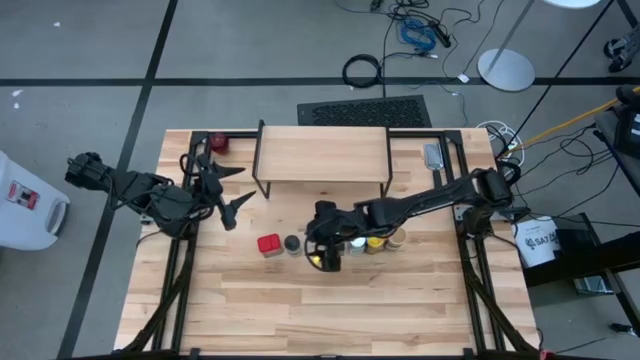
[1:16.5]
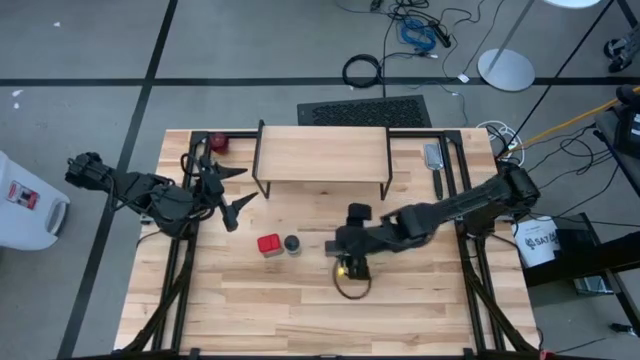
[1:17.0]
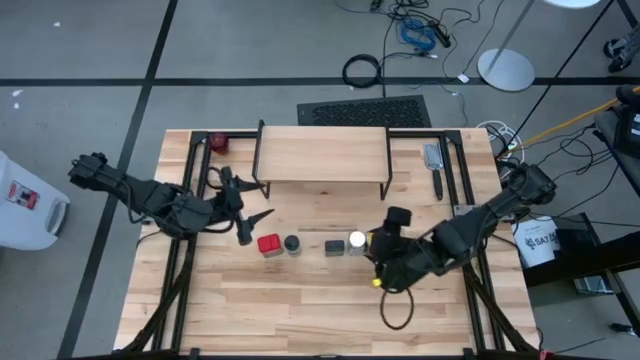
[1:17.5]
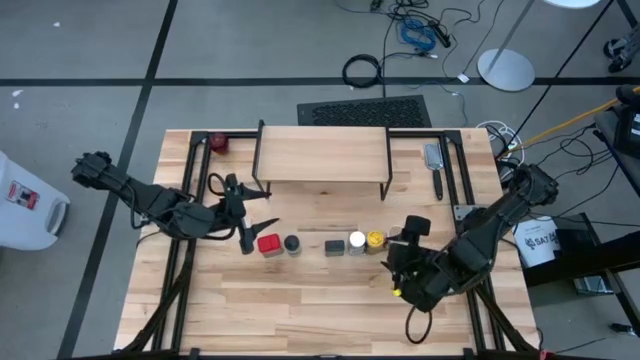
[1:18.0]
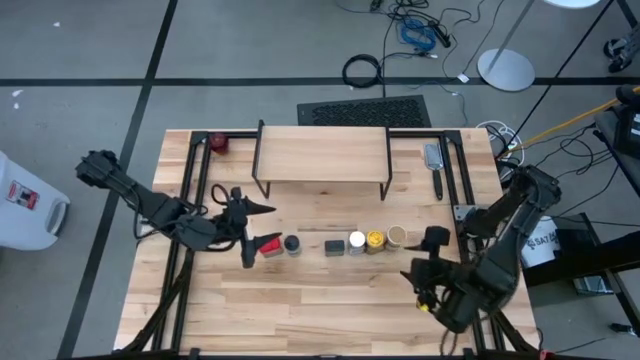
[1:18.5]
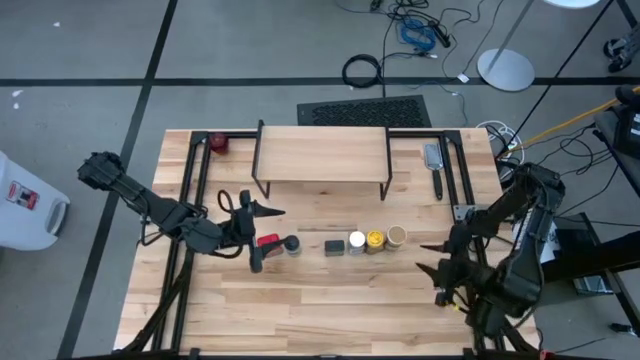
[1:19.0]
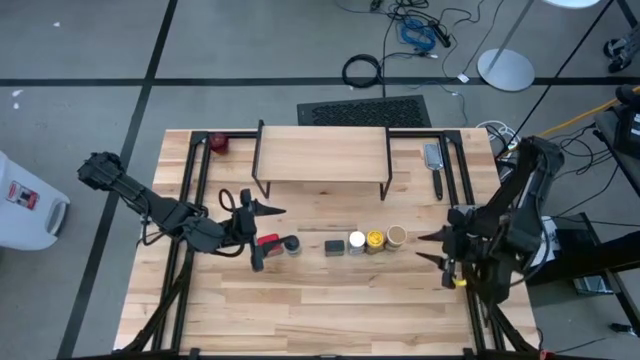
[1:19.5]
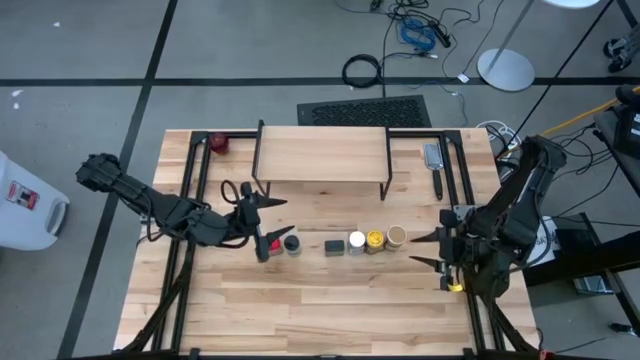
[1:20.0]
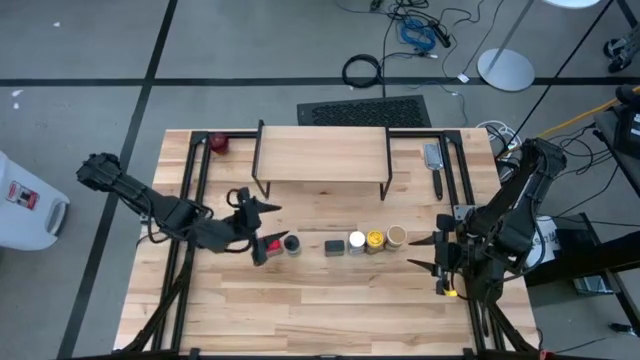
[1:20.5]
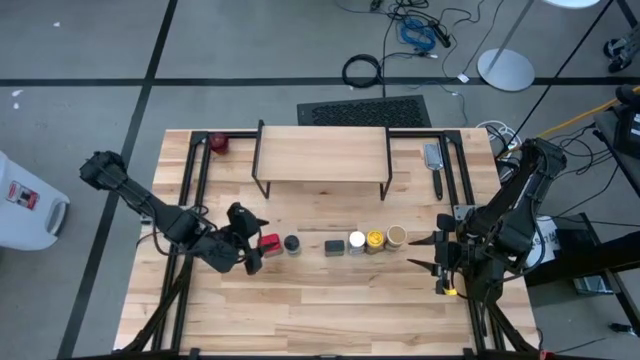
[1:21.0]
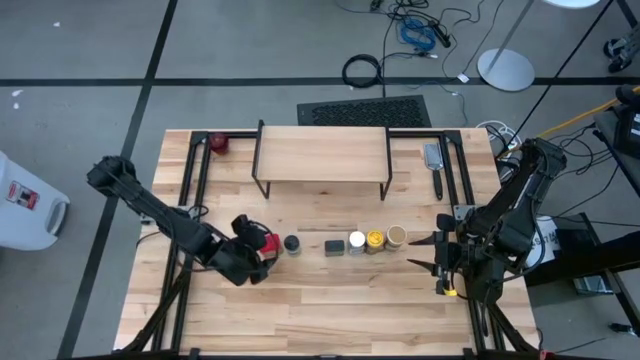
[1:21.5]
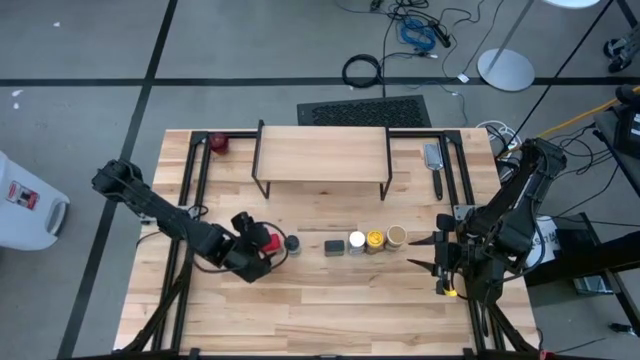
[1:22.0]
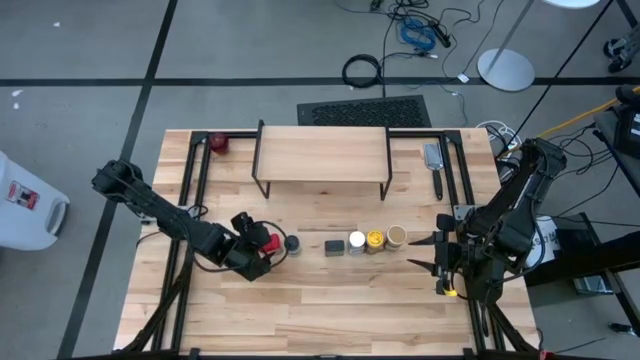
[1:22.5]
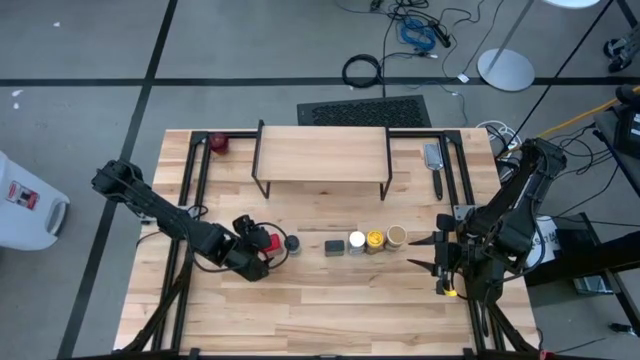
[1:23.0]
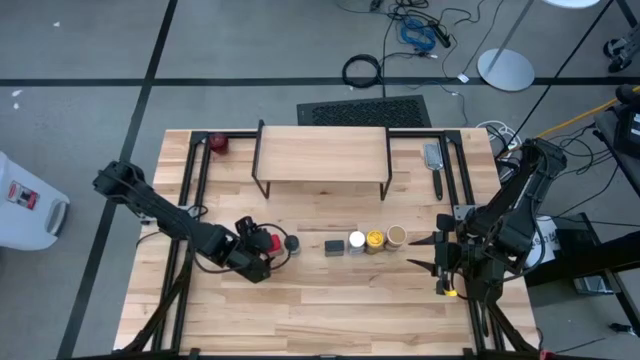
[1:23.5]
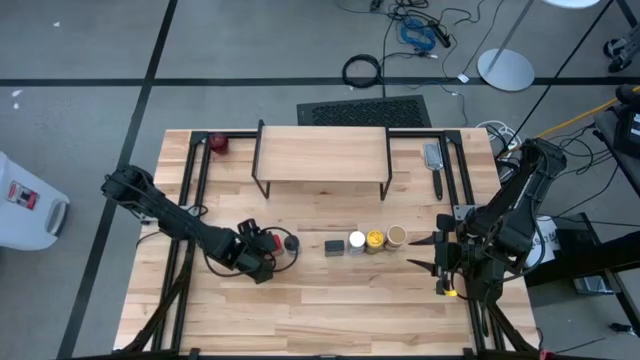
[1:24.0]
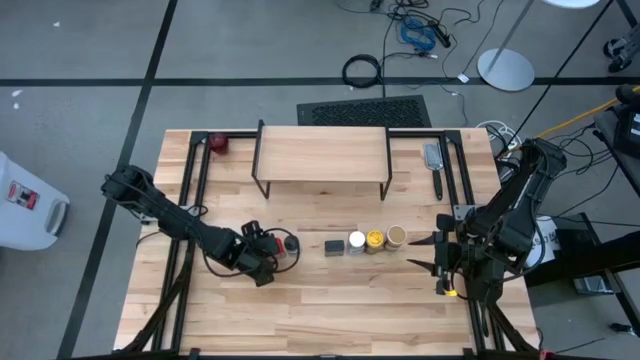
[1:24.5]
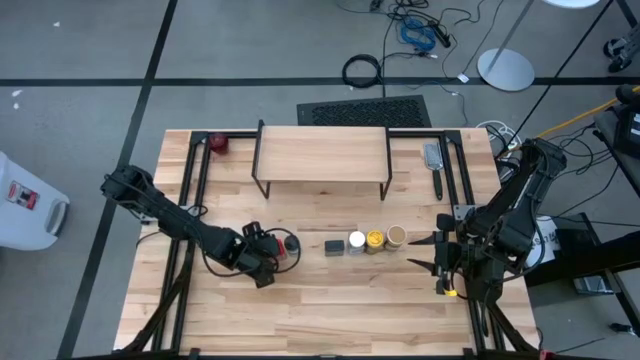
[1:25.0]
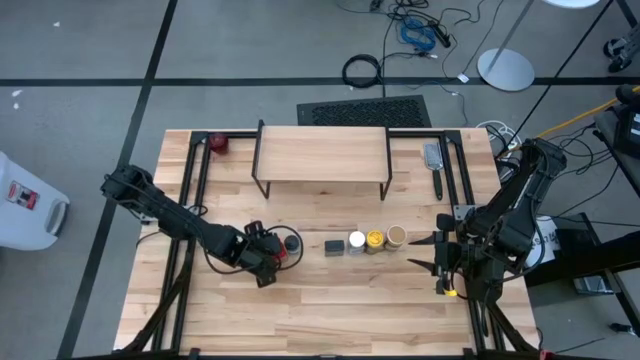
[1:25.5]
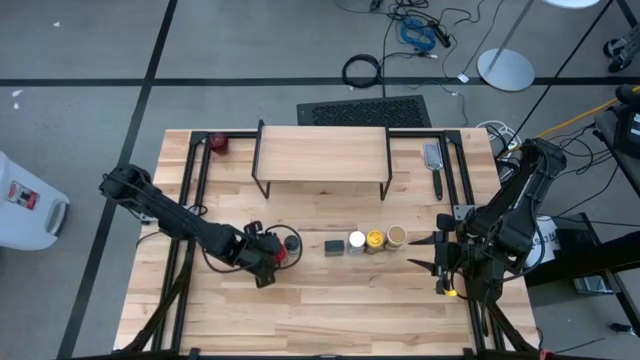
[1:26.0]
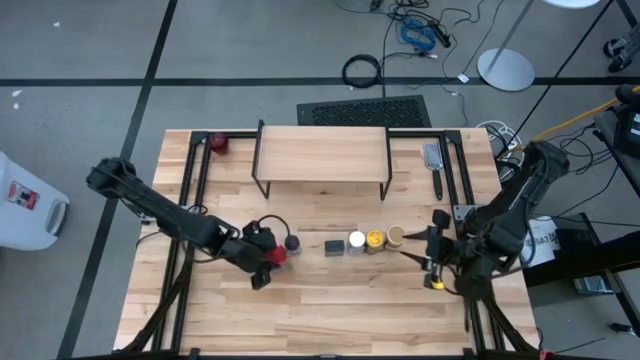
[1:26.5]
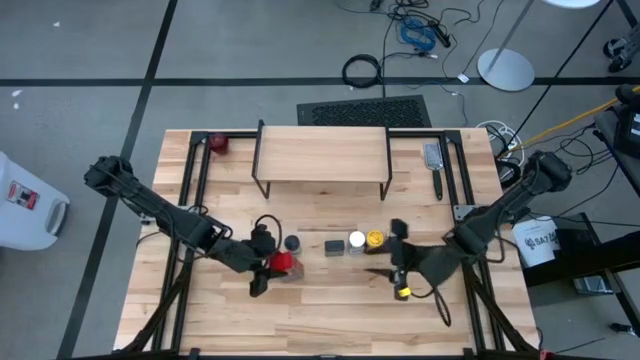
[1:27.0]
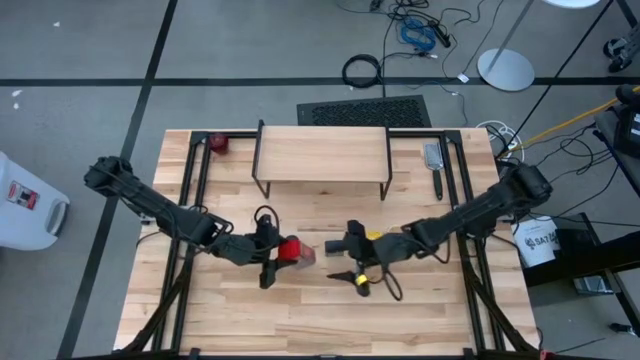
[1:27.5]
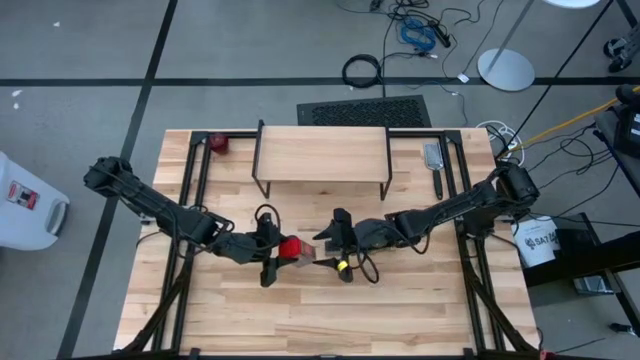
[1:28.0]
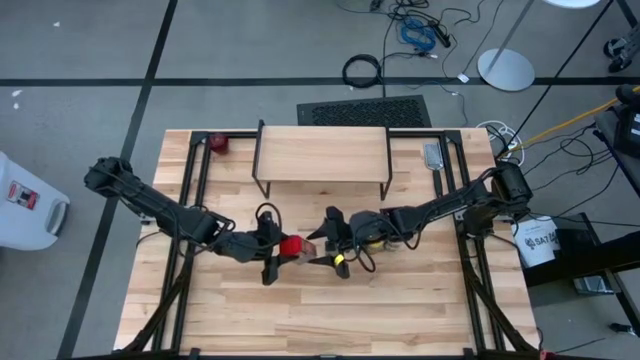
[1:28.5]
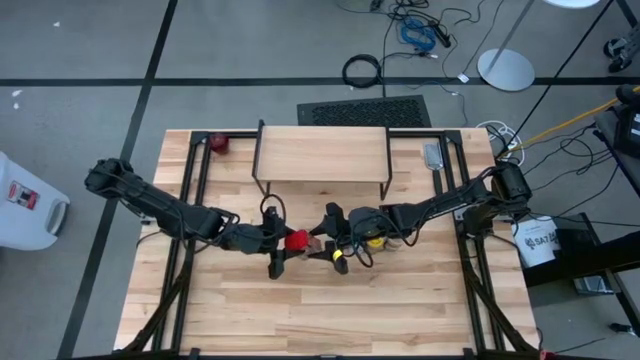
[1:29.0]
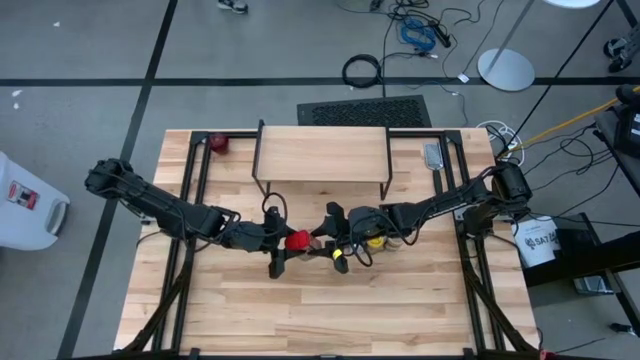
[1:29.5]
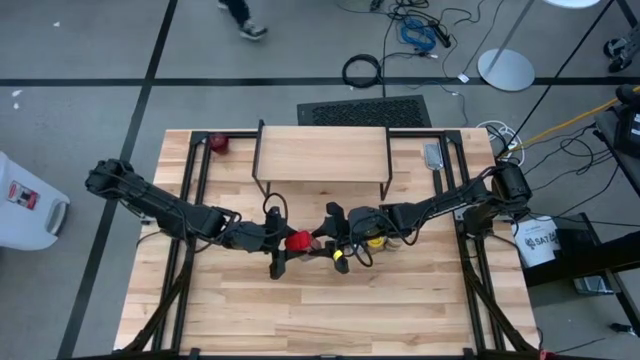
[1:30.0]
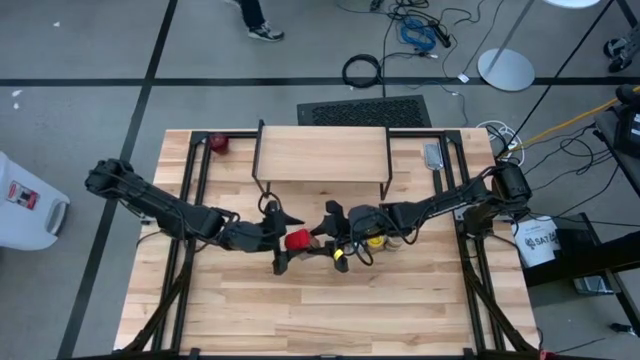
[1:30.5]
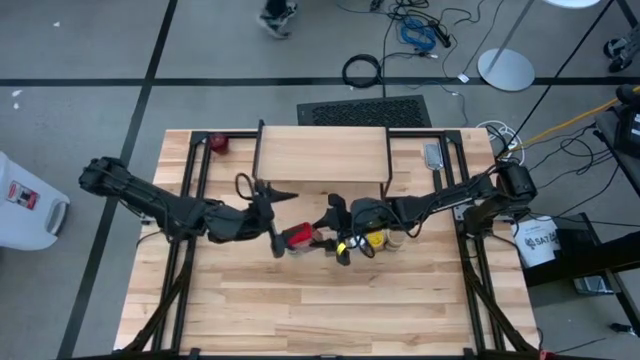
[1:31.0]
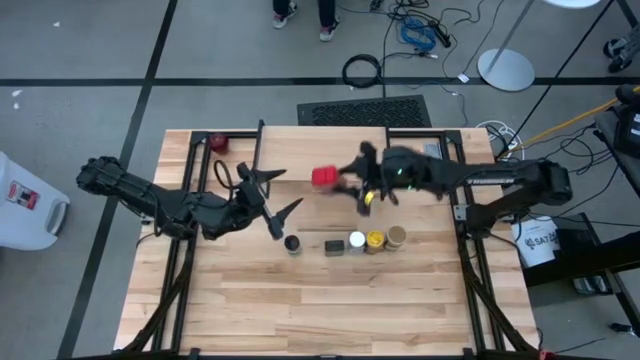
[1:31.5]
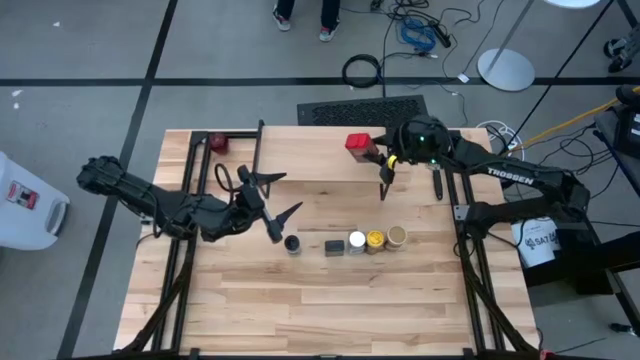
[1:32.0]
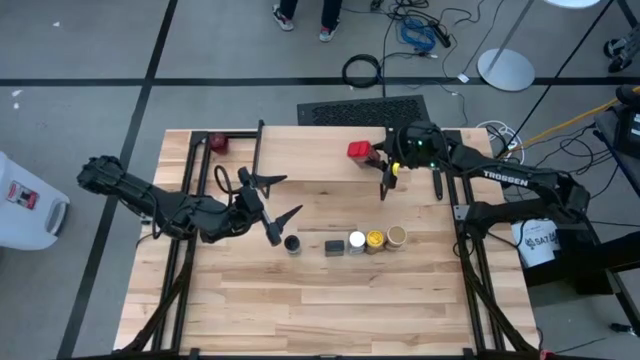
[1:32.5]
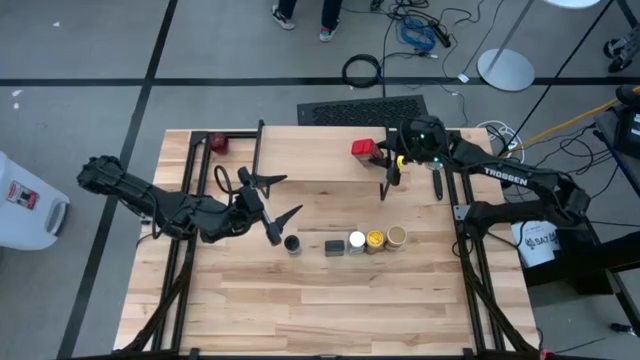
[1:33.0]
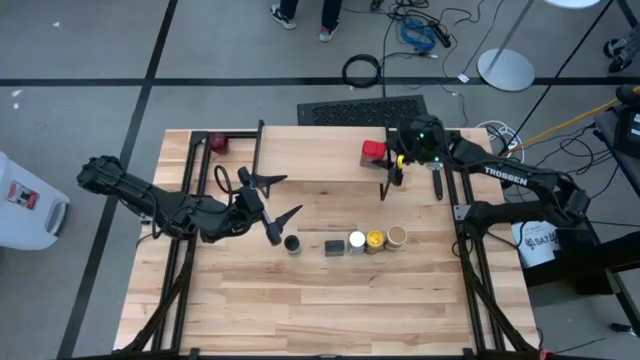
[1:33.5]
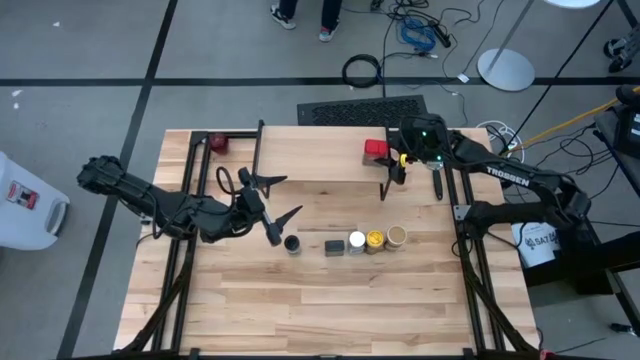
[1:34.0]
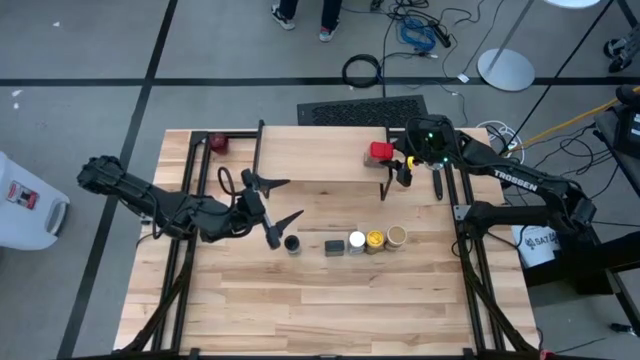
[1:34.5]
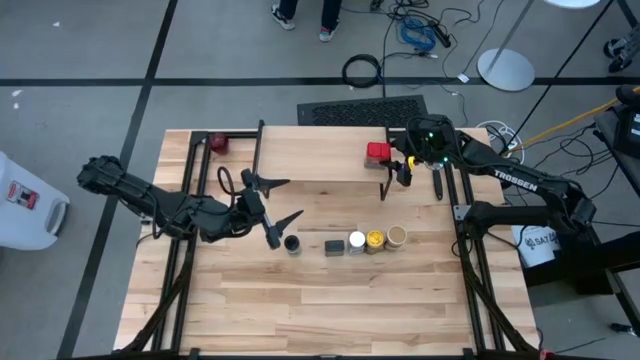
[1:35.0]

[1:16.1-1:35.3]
Task: Shelf spices
Put the red seasoning can on the shelf

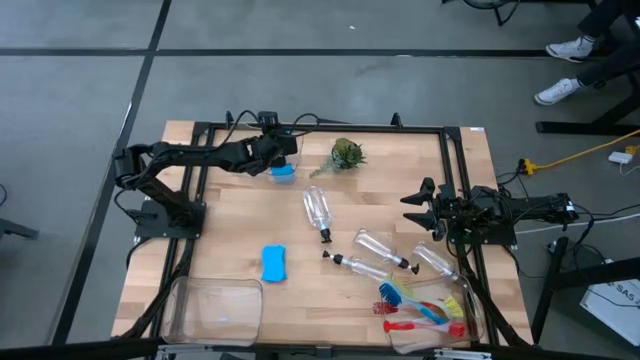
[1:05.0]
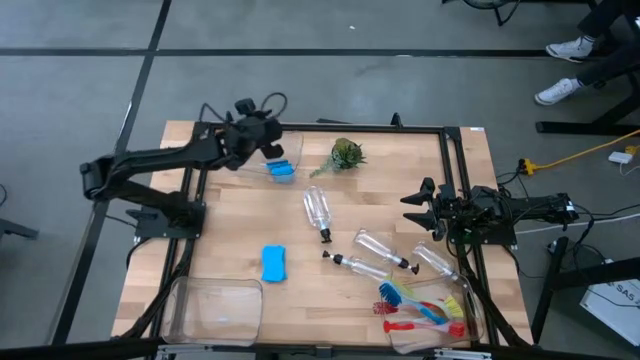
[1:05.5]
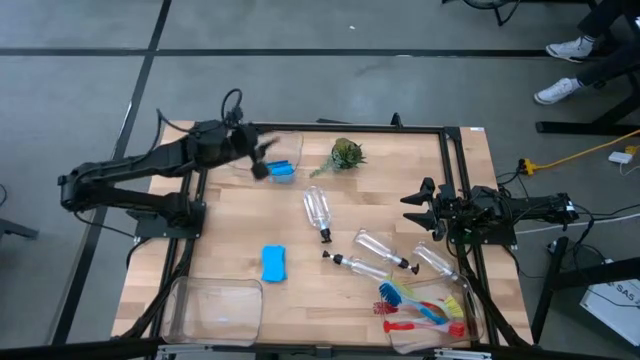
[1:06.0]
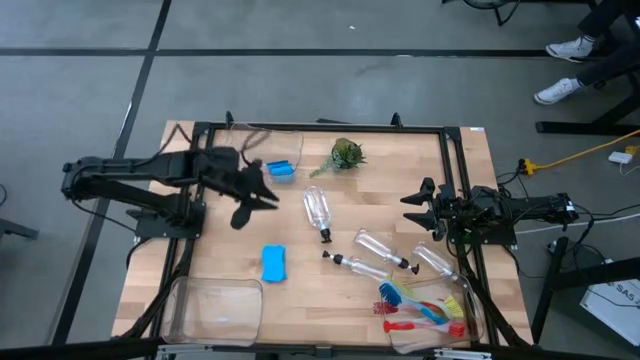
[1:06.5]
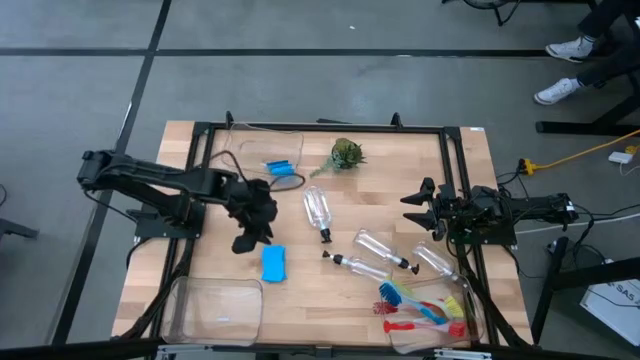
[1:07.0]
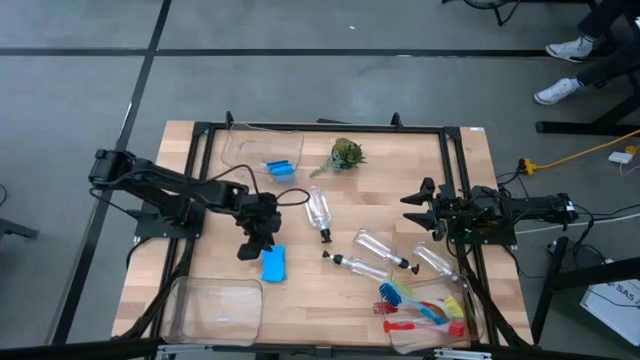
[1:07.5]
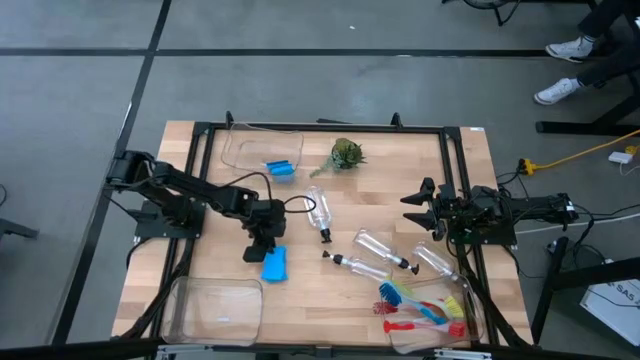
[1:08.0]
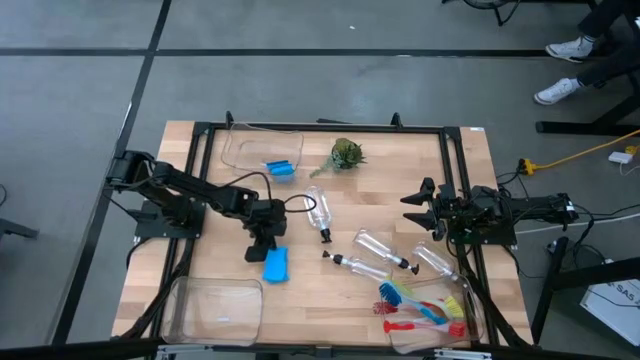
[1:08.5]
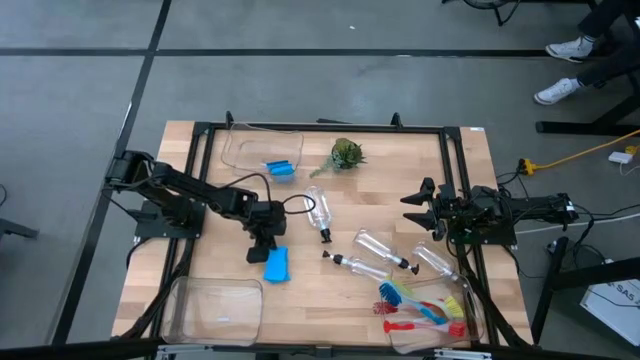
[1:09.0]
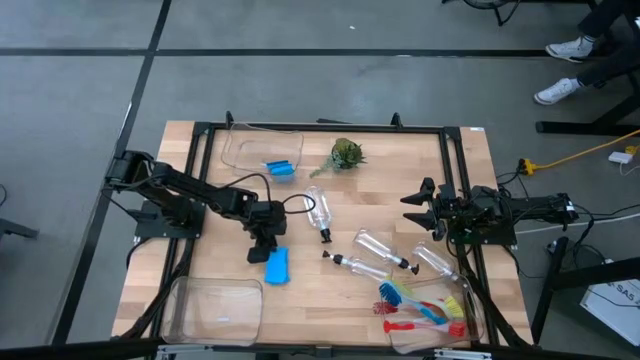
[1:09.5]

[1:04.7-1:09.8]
Task: Pick & Place Kitchen Sink Supplies
Put the blue sponge into the top transparent bin
